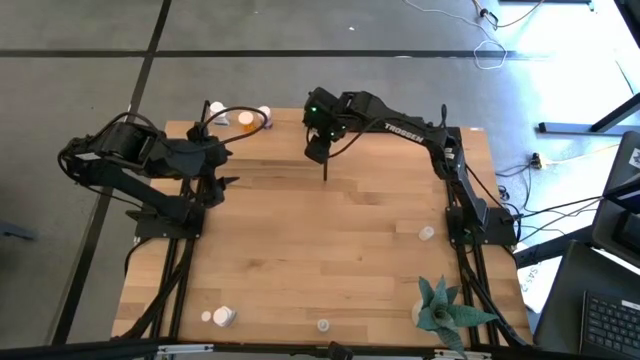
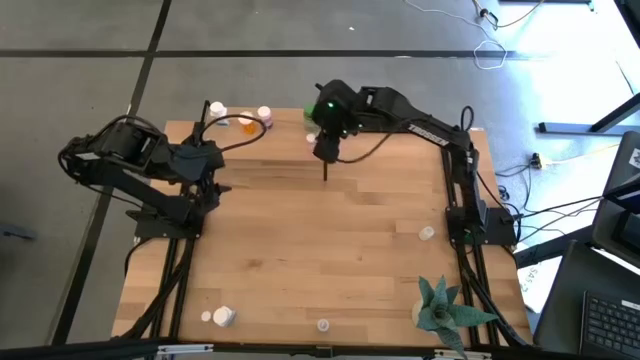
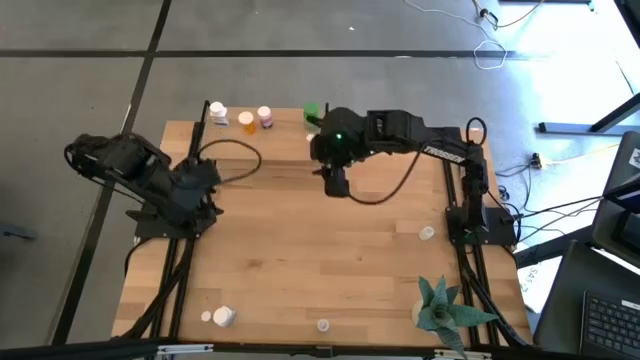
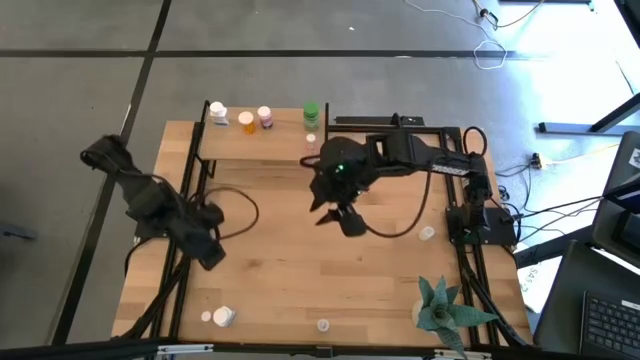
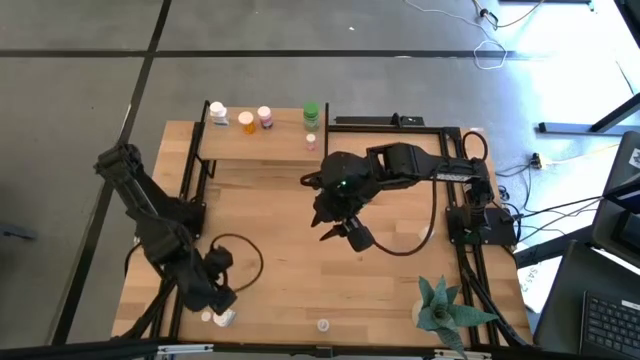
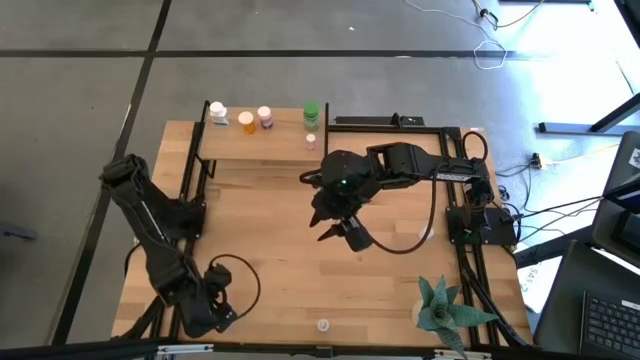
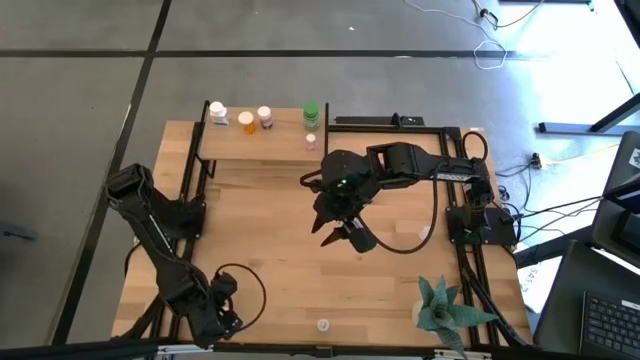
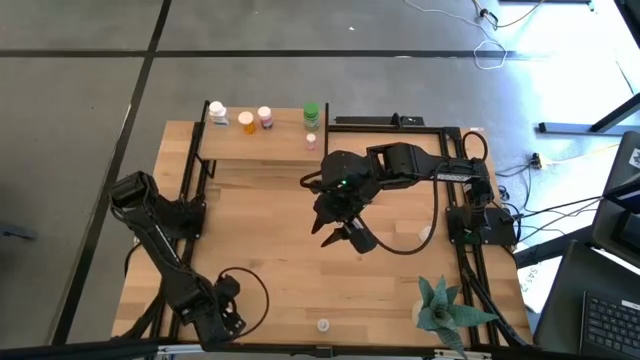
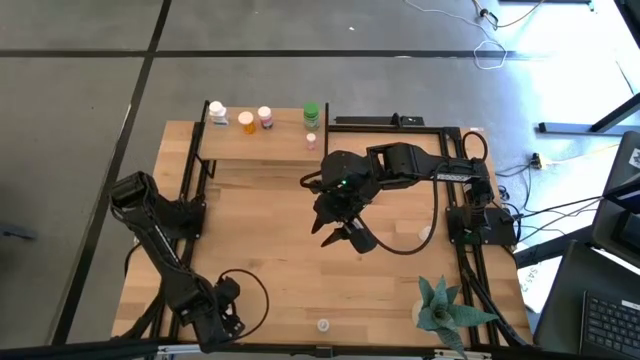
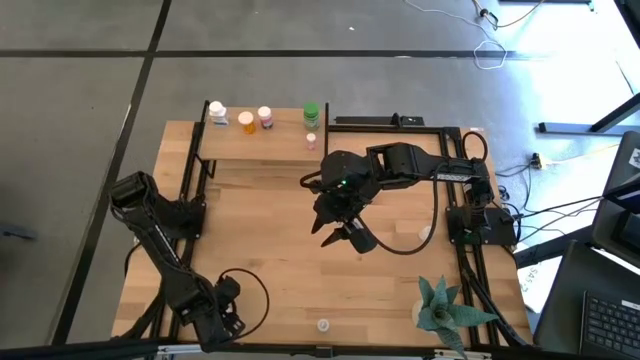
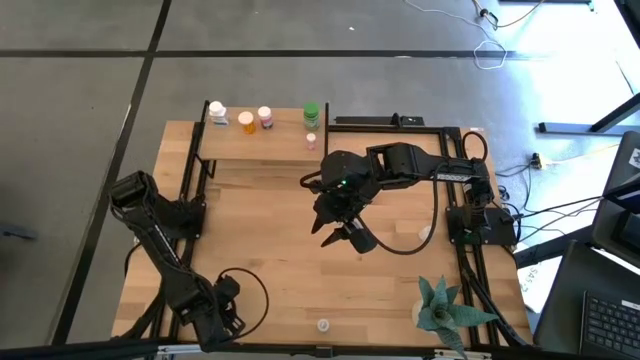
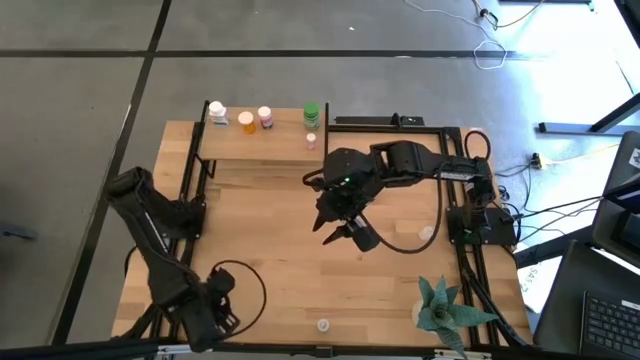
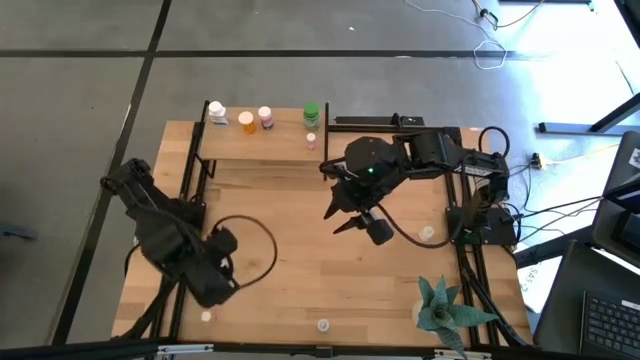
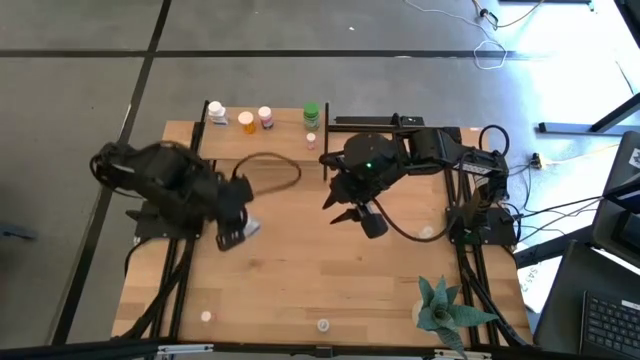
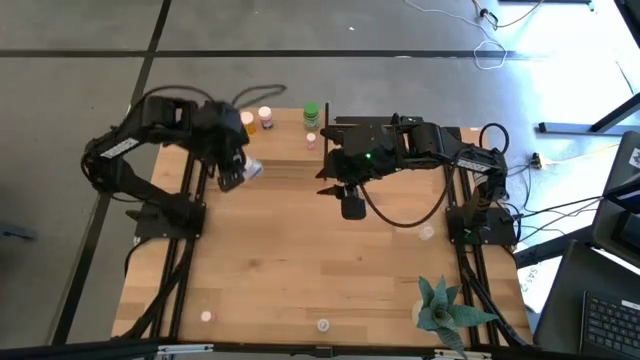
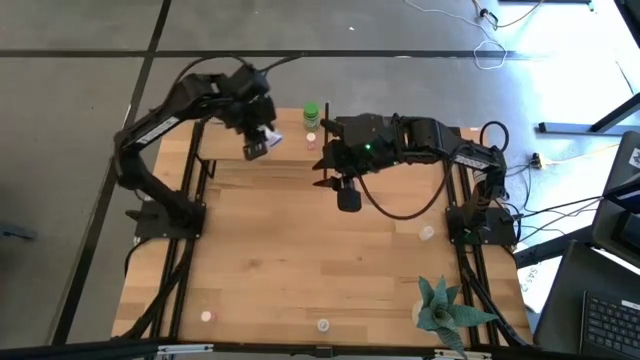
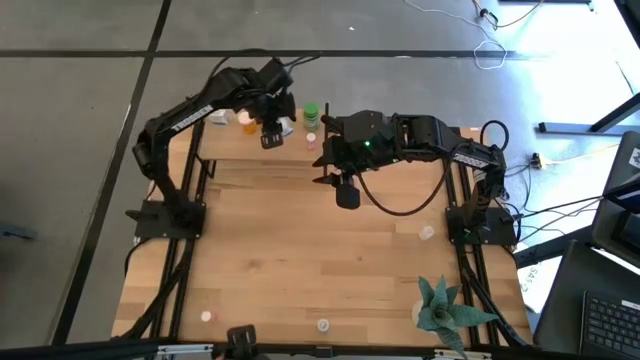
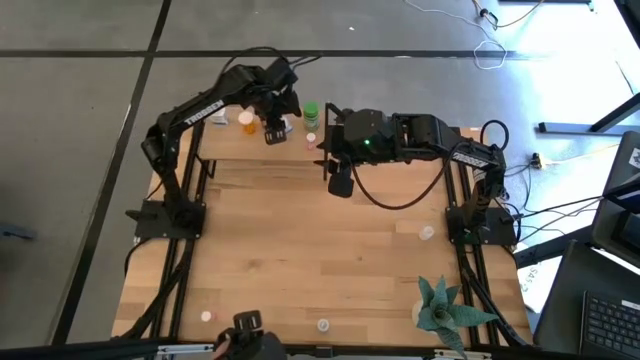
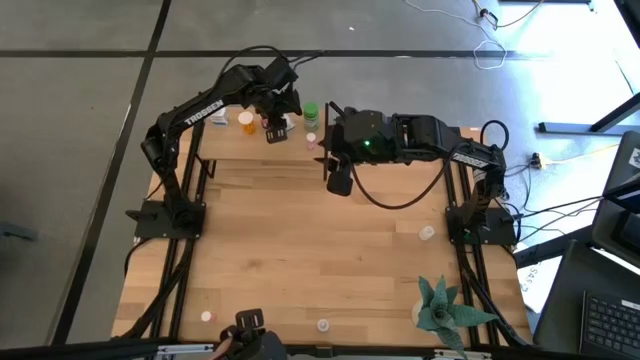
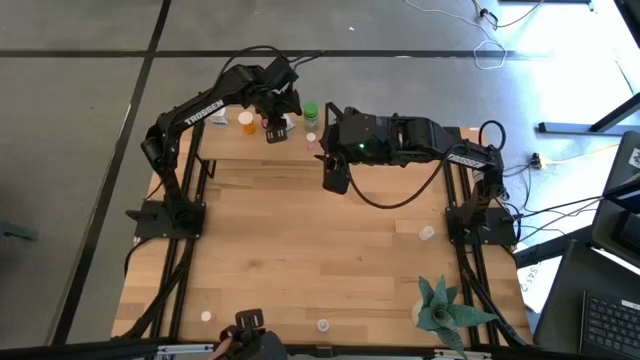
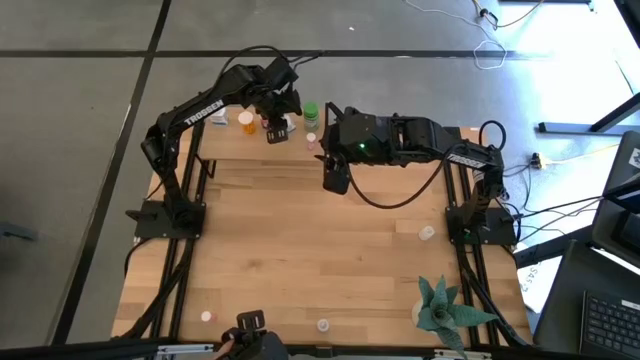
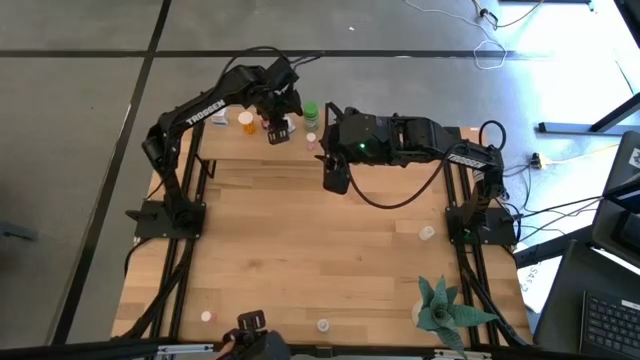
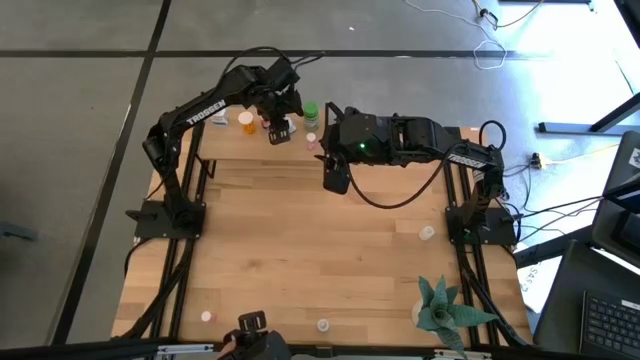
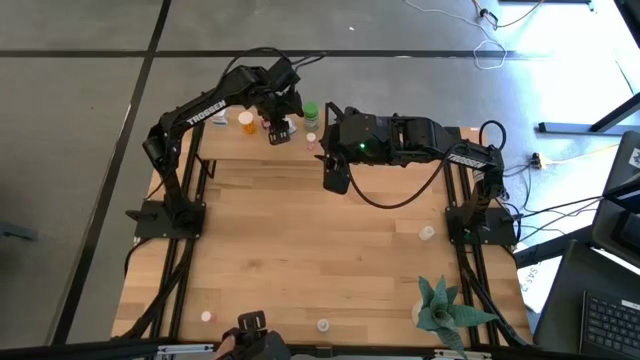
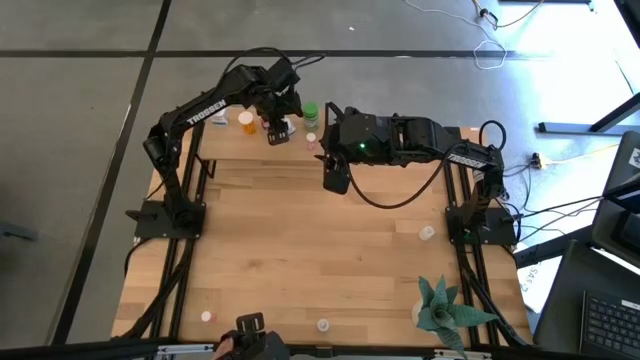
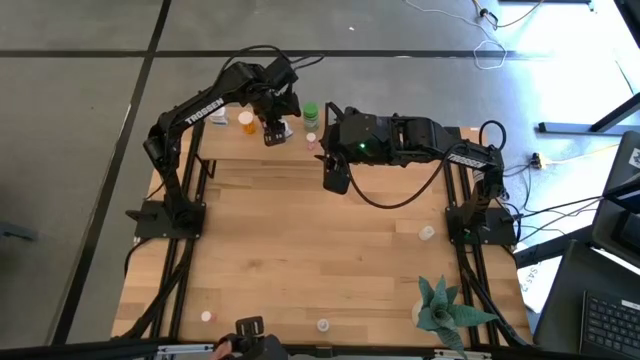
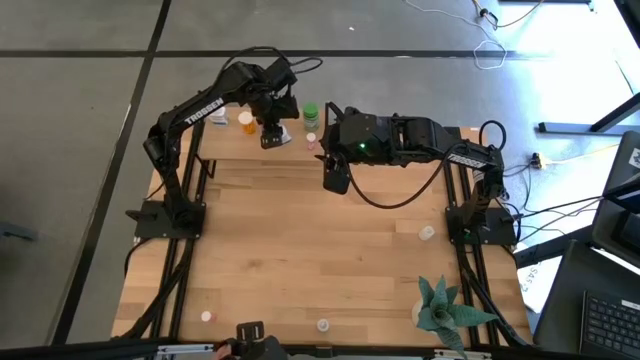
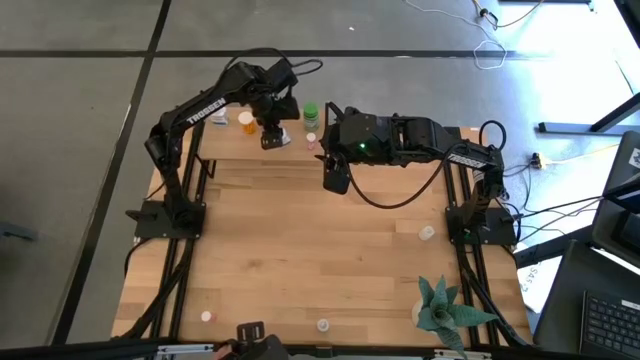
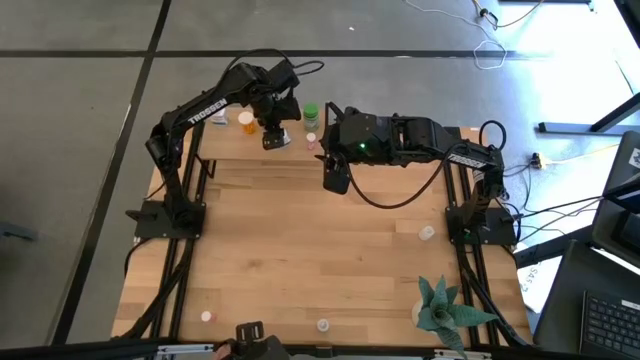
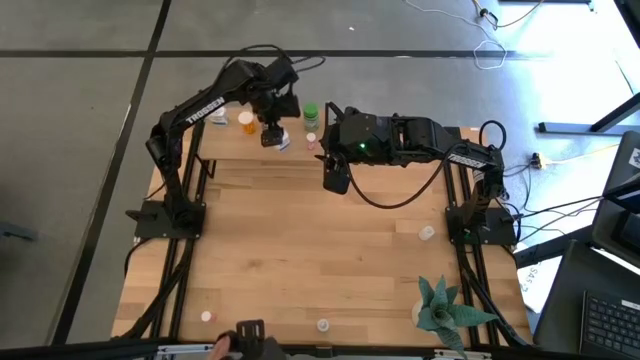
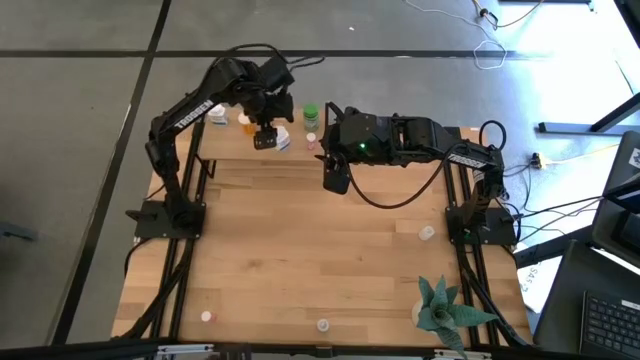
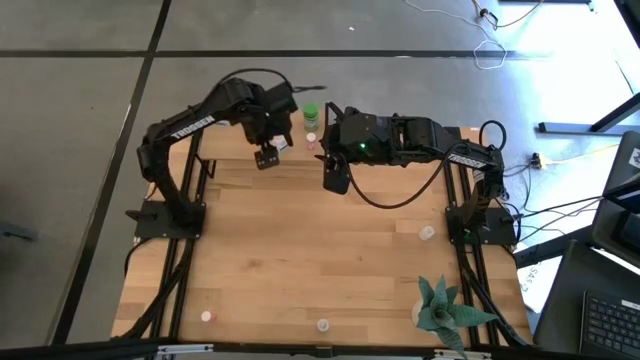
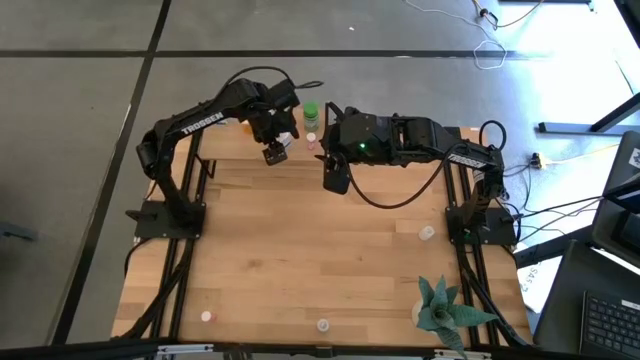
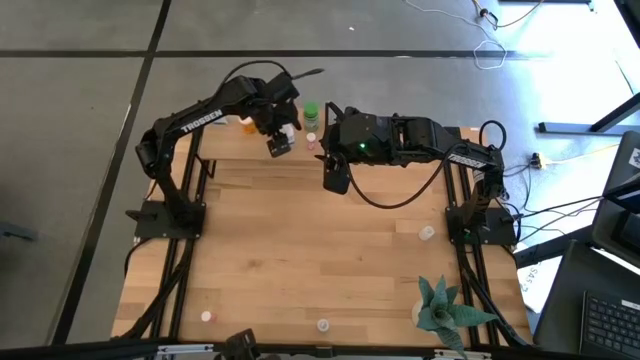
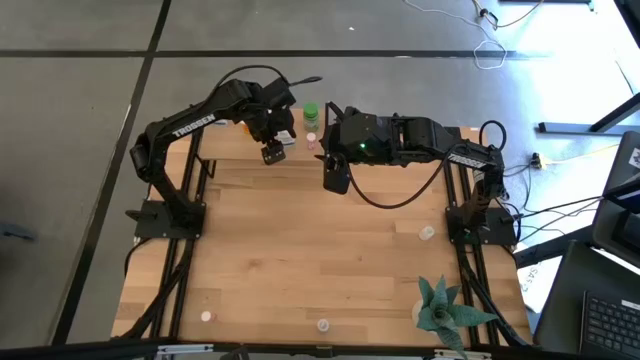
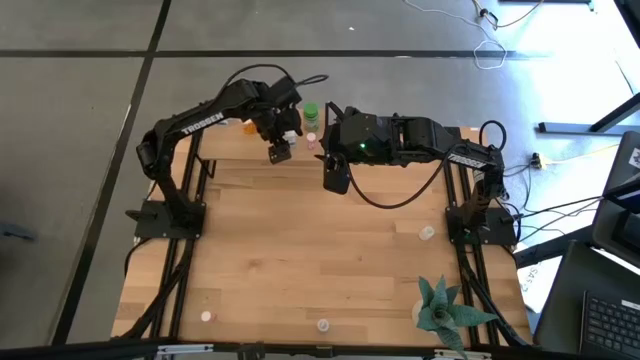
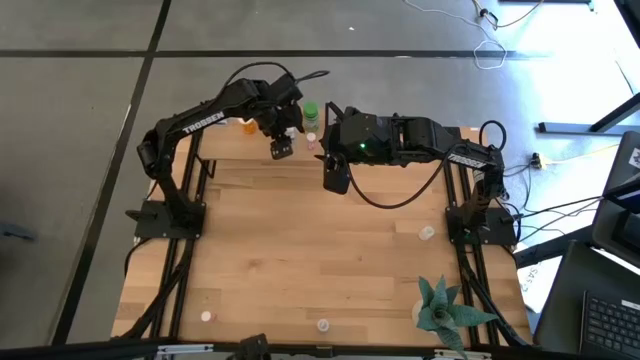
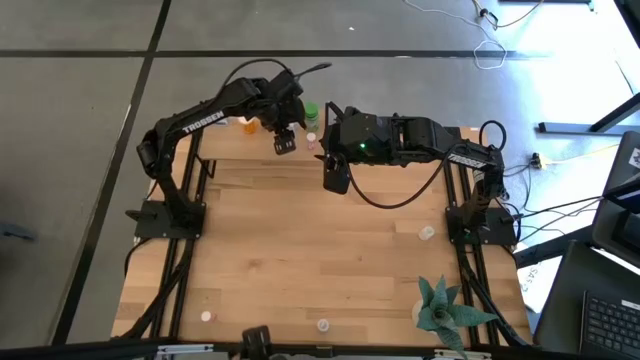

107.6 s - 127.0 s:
Task: Pick and place medicine bottles onto shelf by color
Put the white pill bottle on the shelf

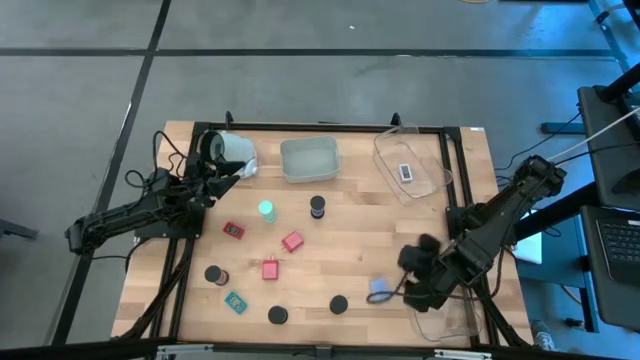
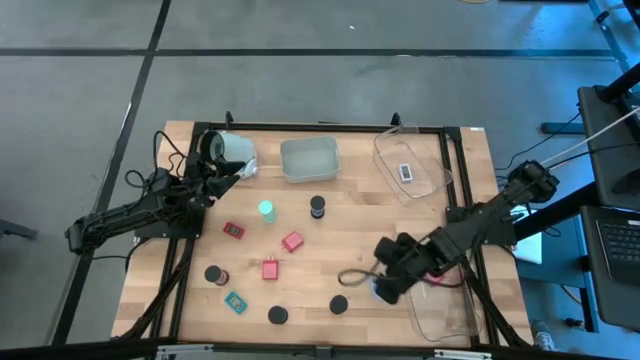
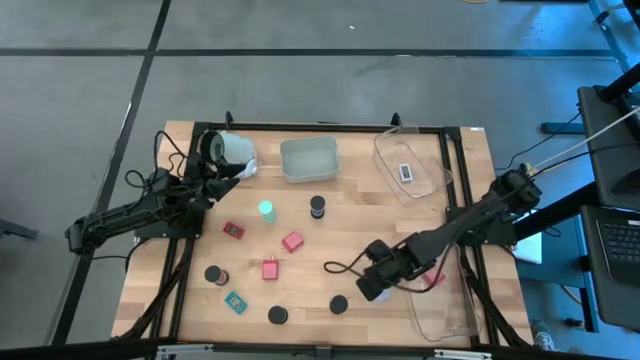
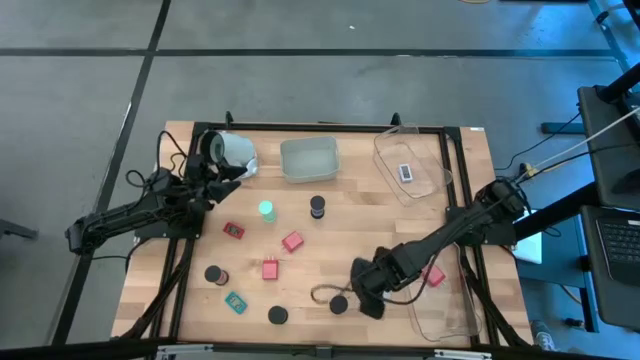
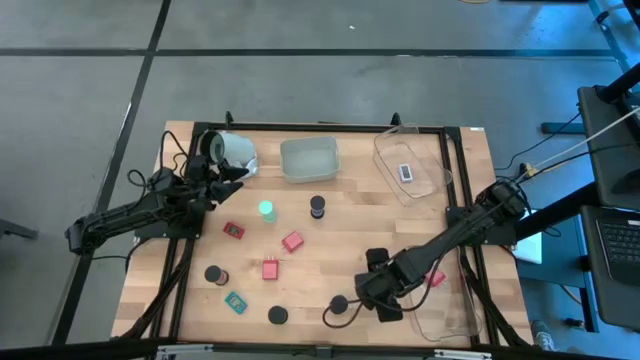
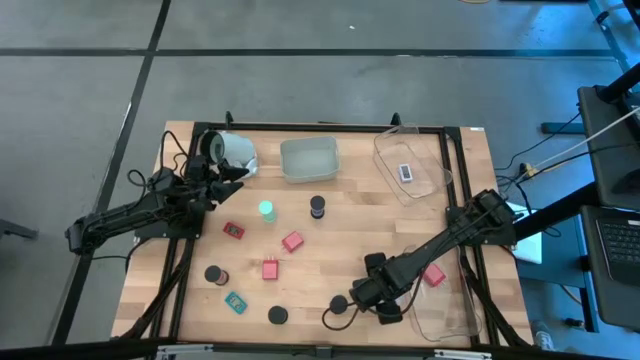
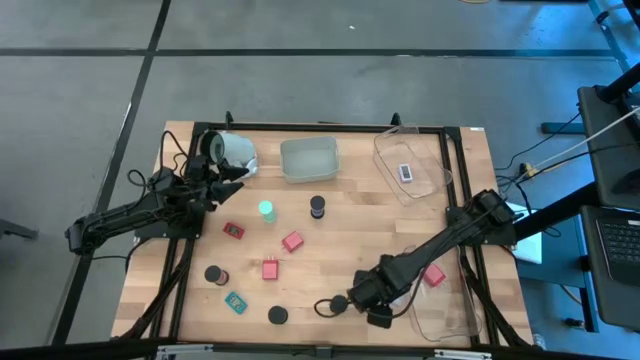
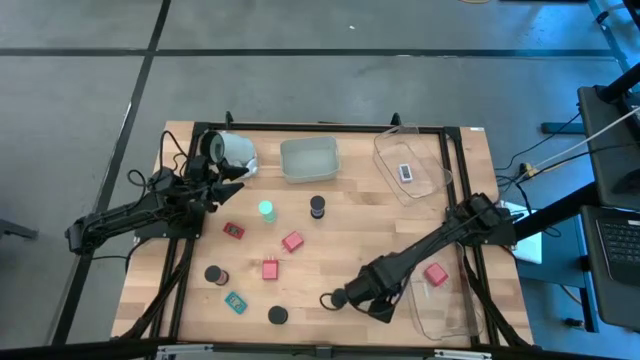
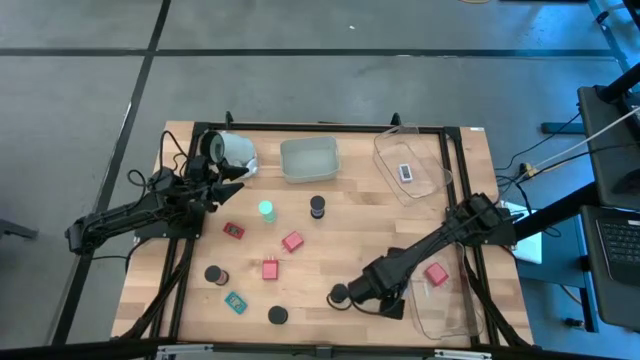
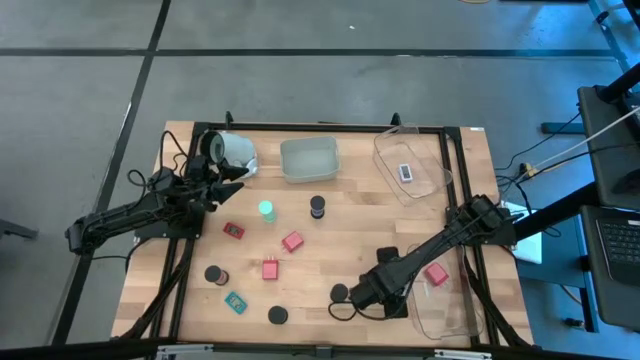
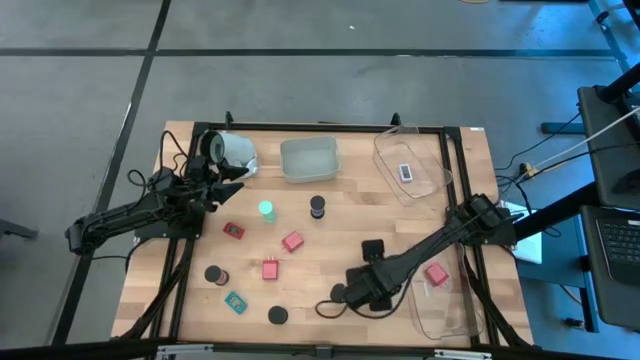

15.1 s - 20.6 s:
Task: Pick & Place Office items
Put the white charger adapter into the bottom transparent bin
